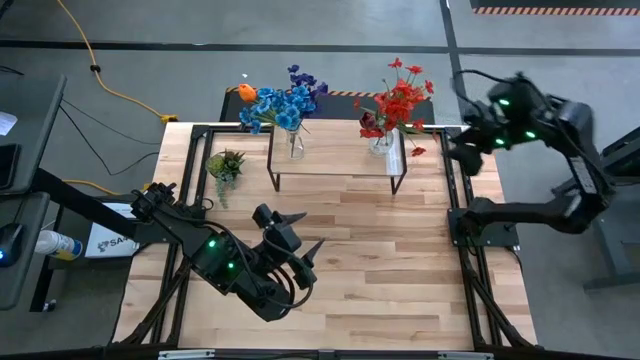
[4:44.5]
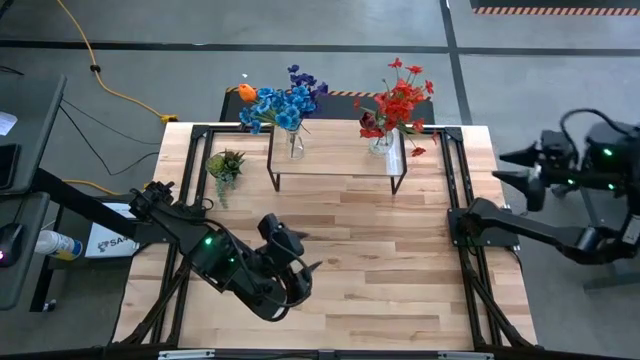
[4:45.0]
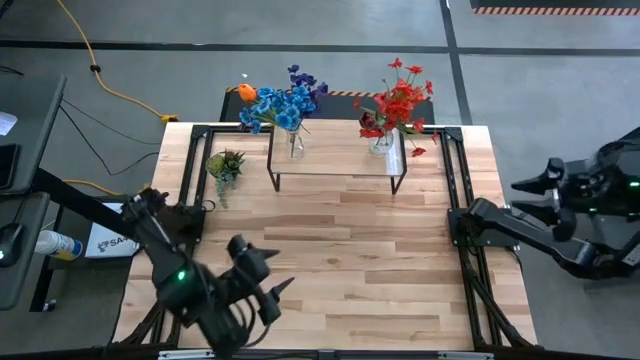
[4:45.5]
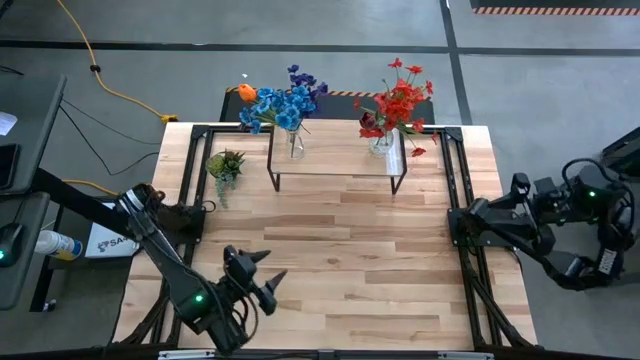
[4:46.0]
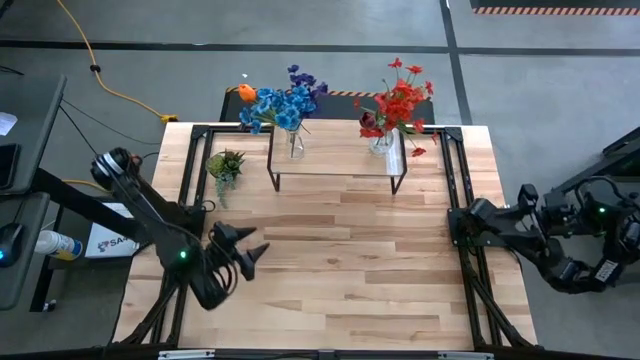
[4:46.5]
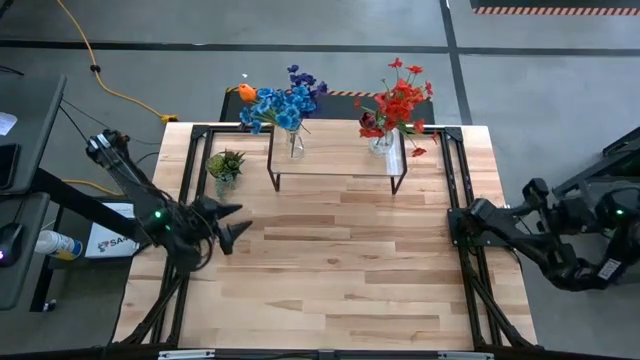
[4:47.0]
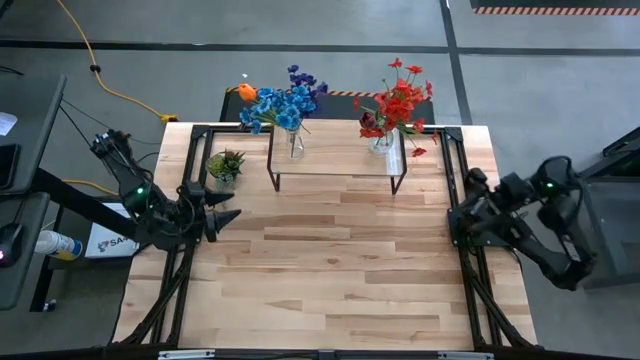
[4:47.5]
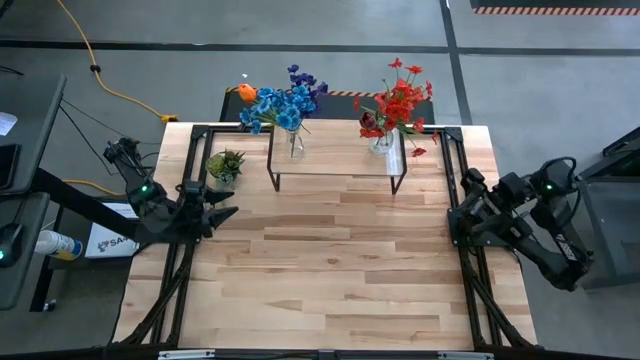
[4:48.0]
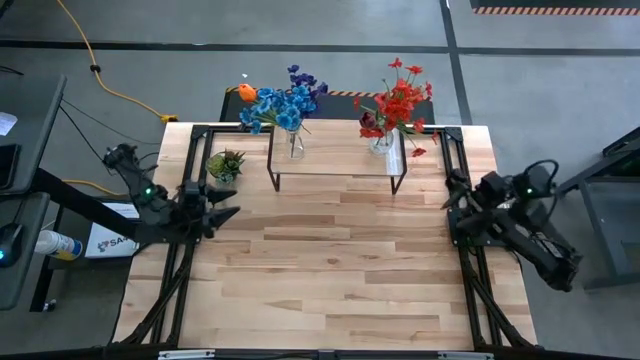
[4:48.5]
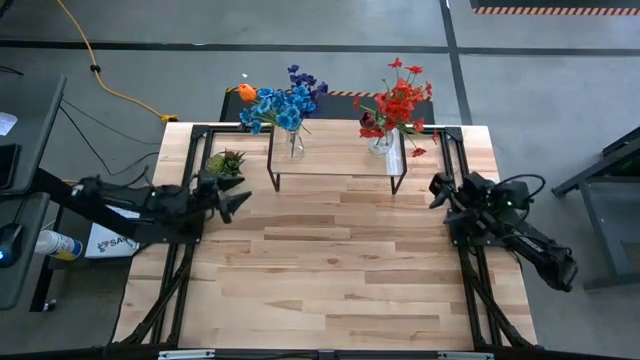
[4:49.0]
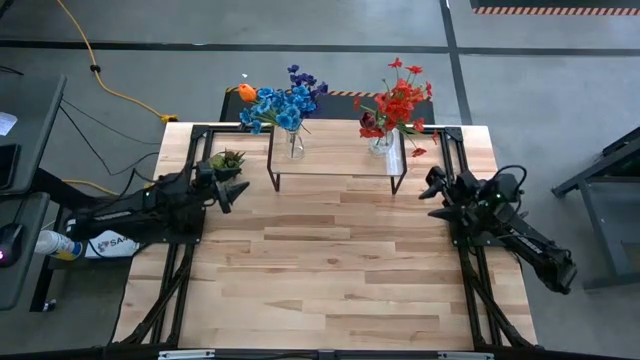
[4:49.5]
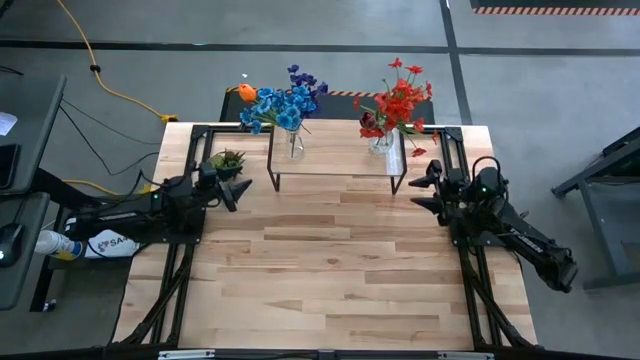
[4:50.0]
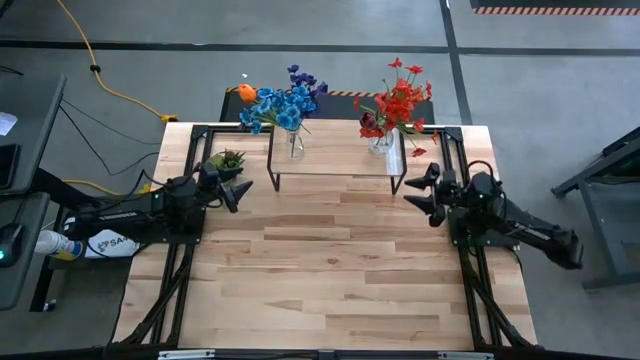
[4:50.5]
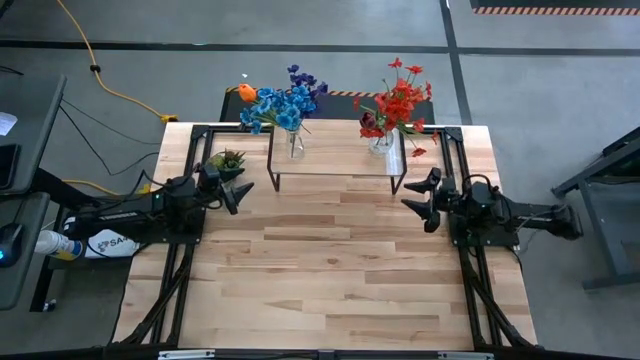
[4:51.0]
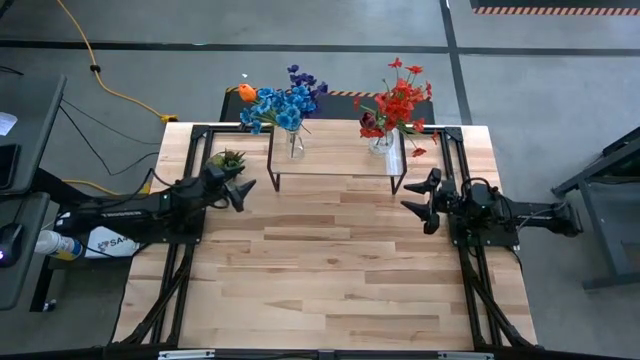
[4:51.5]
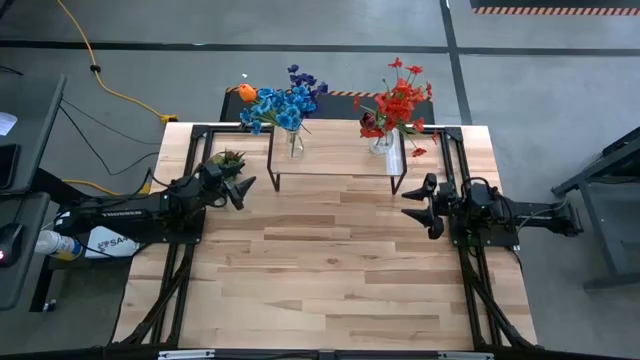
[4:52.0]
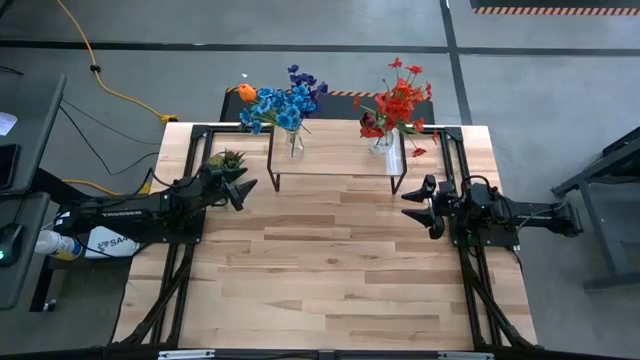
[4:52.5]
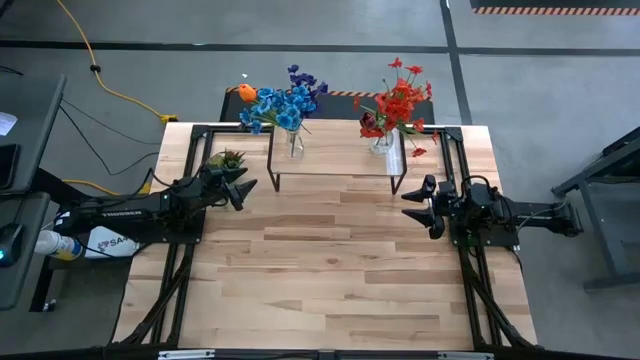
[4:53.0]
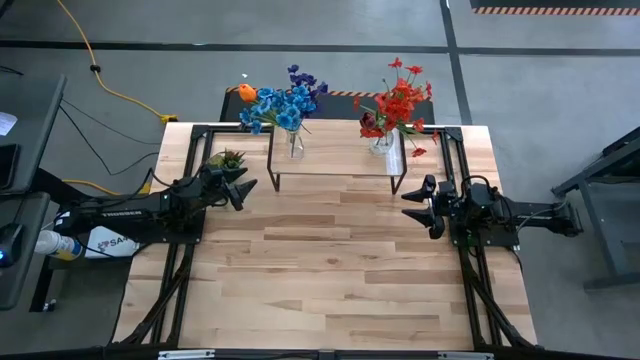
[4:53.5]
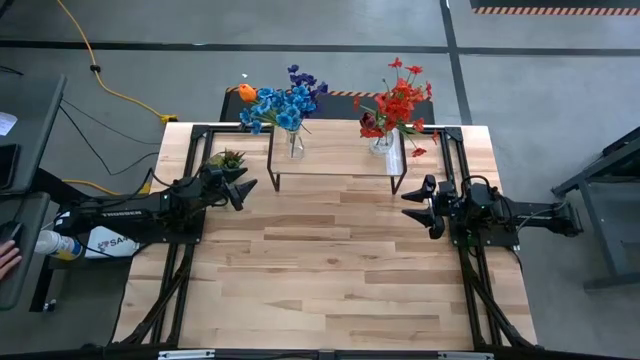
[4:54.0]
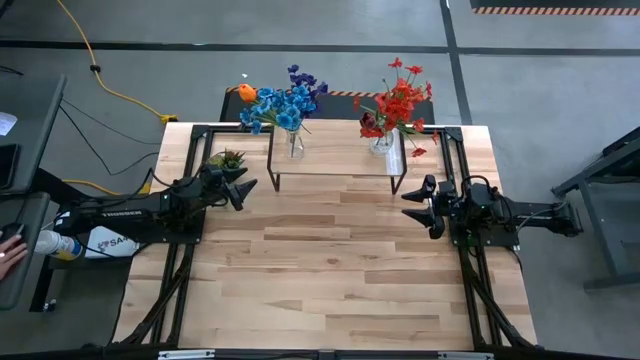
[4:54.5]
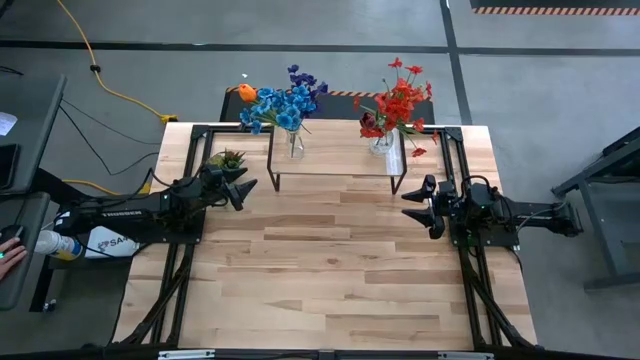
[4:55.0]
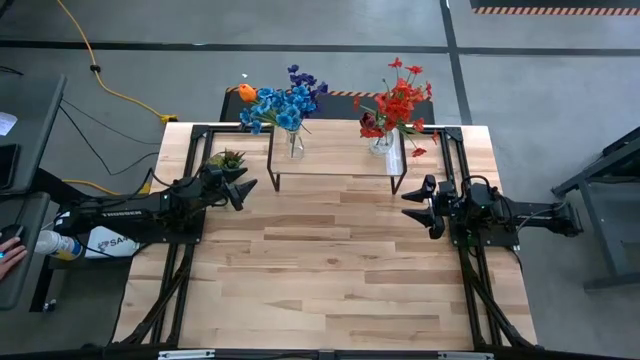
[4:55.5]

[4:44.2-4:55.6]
Task: Pick and place flowers into a vace then onto a shelf
Return to Home Position

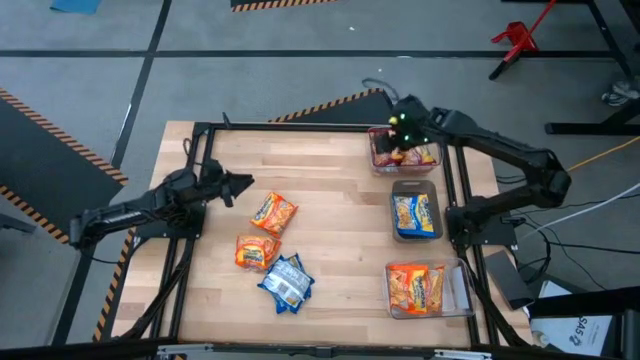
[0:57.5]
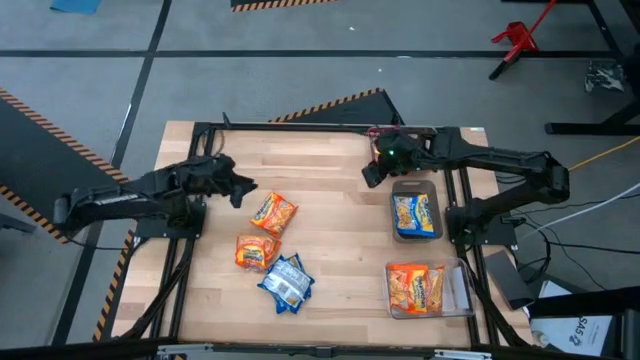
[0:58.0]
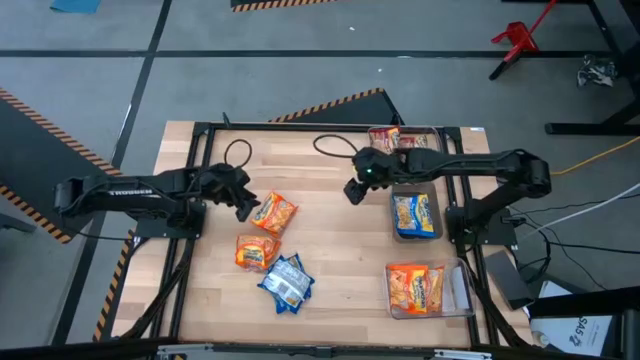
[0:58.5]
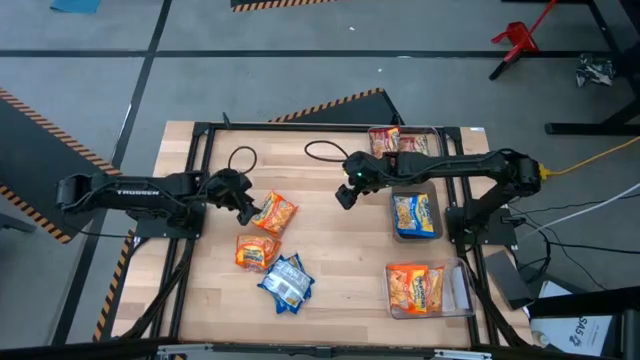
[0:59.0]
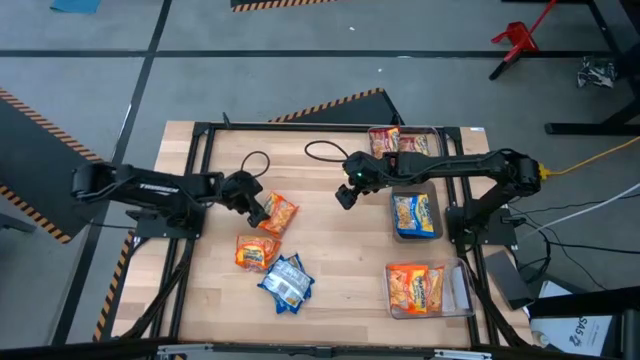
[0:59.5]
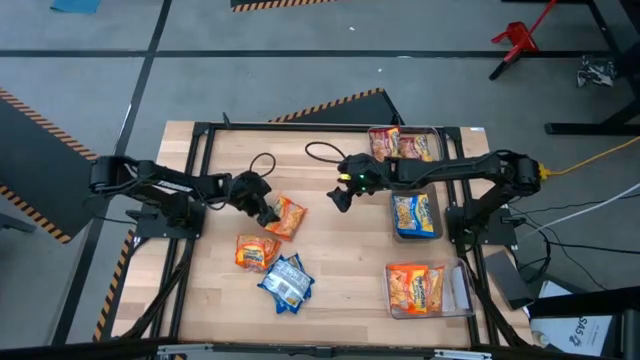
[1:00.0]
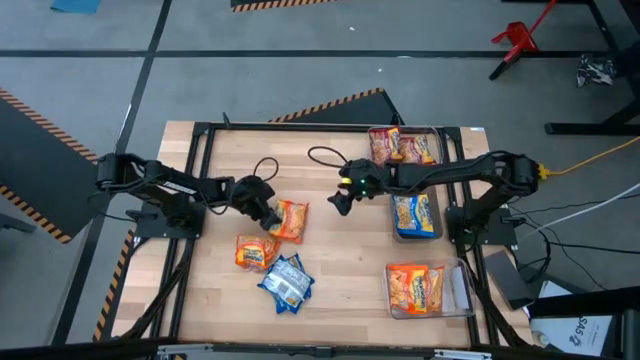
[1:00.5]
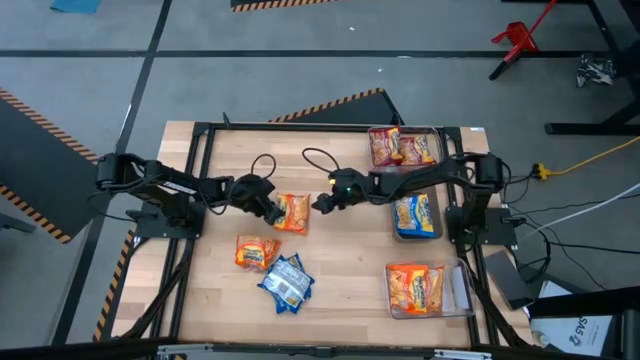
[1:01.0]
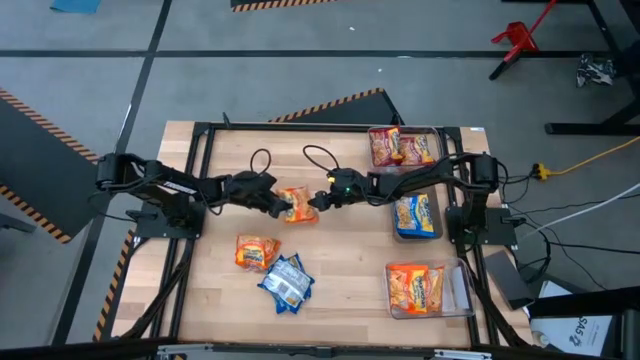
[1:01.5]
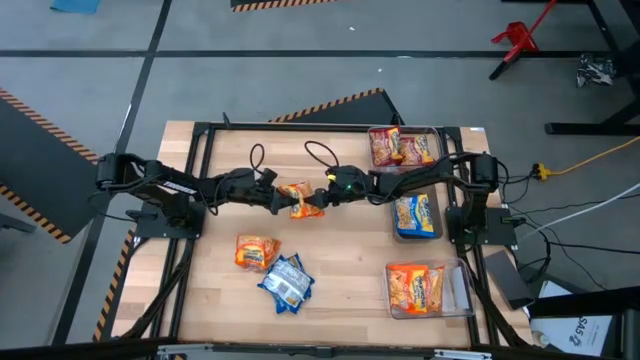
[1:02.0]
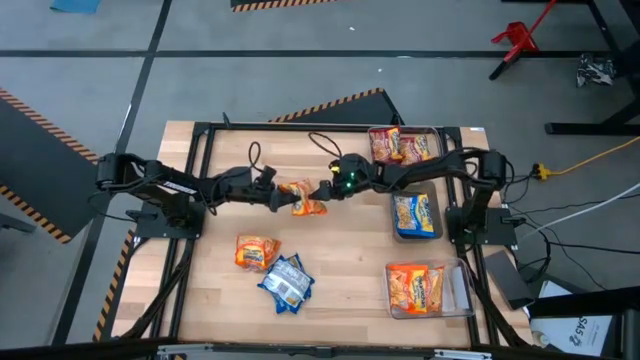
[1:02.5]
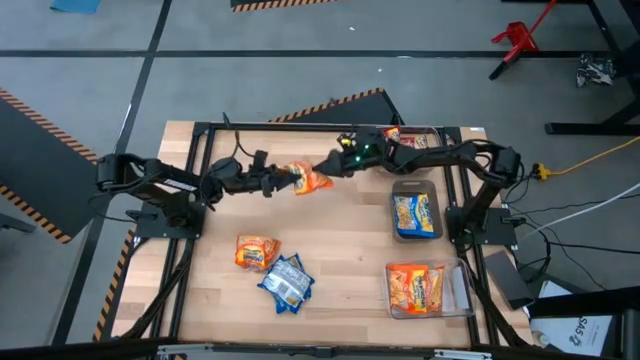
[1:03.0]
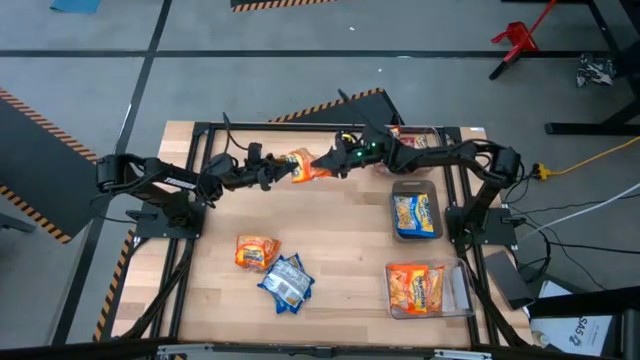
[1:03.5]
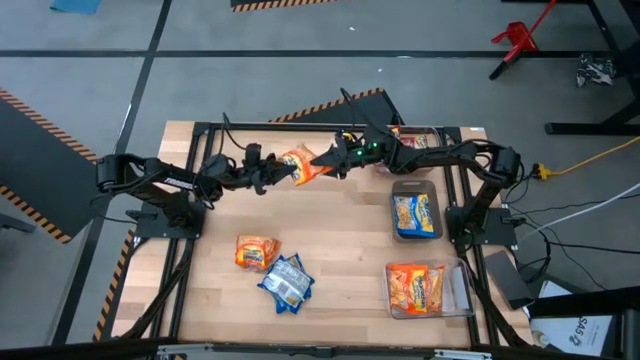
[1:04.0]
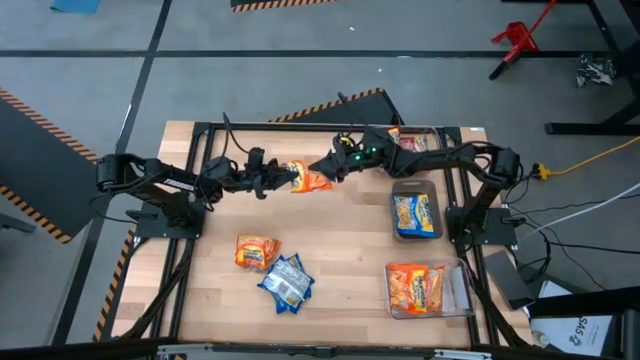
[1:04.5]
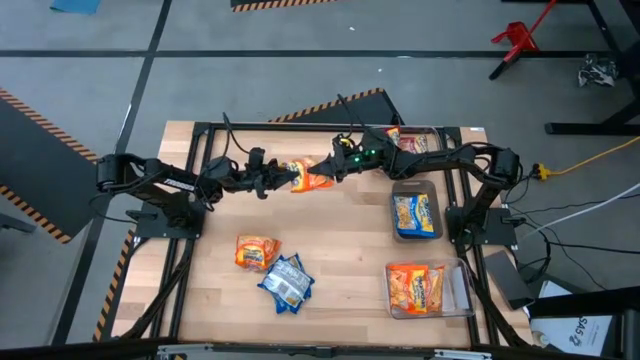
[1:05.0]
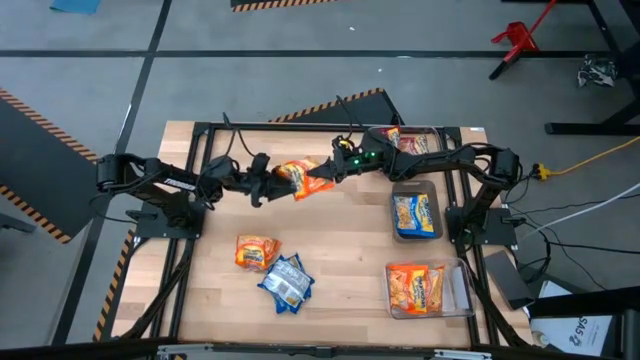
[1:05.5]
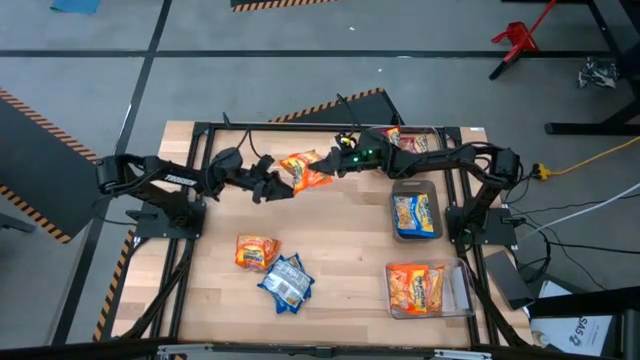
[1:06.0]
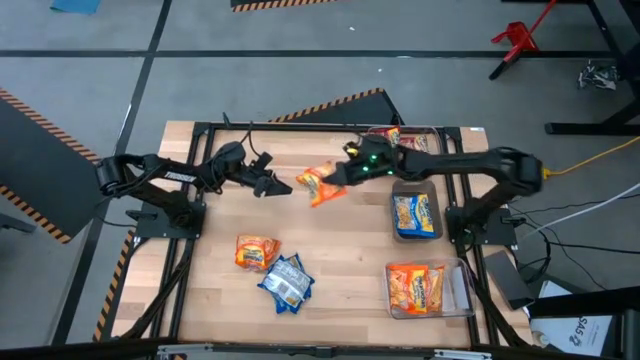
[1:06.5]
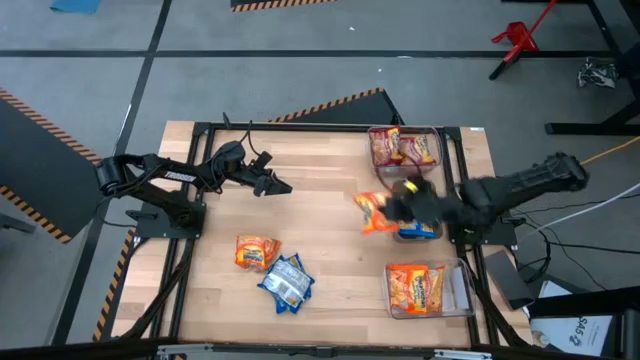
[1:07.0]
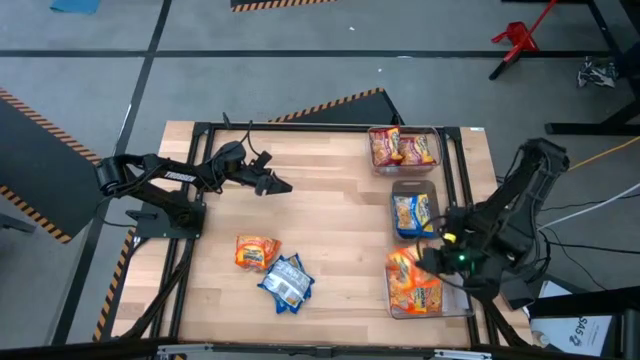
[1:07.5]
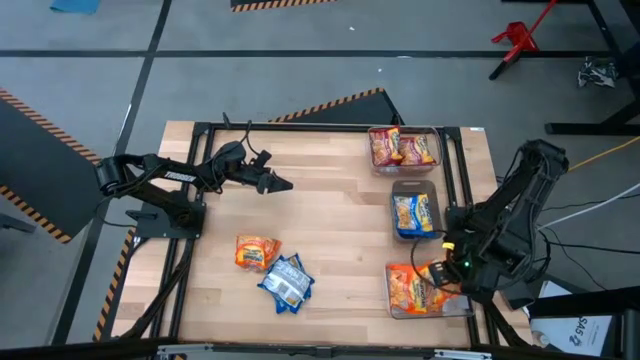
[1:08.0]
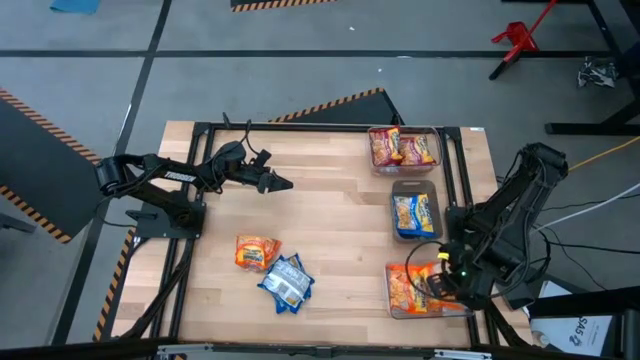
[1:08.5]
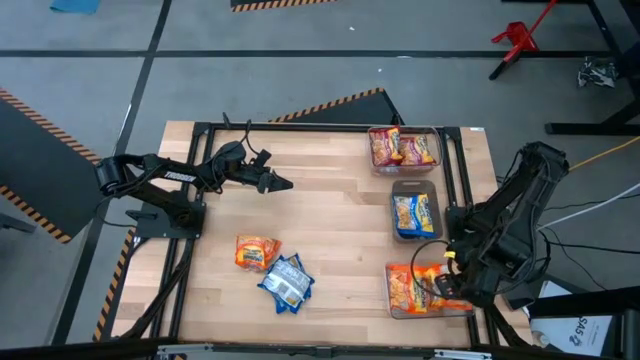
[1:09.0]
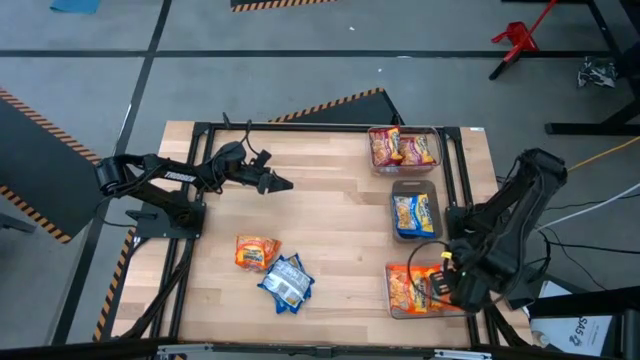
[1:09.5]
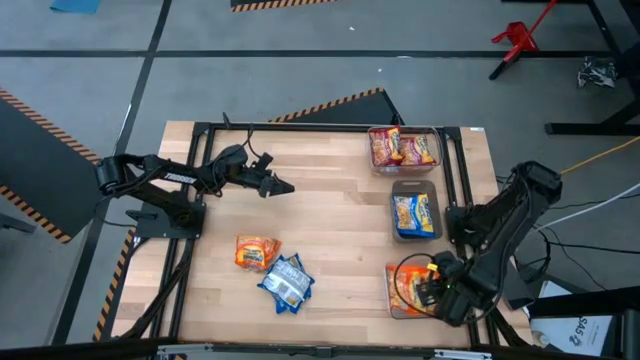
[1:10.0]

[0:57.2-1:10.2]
Task: Sort Maruchan noodles
Put the orange noodle pack into the bottom transparent bin
